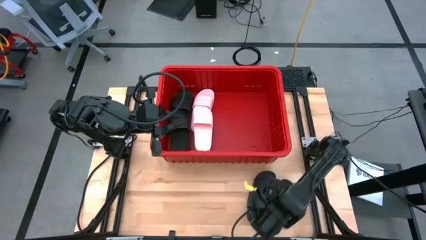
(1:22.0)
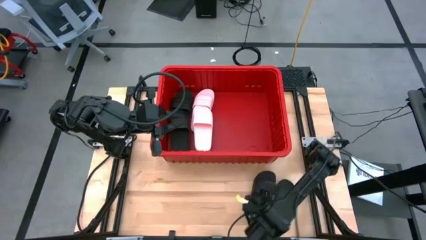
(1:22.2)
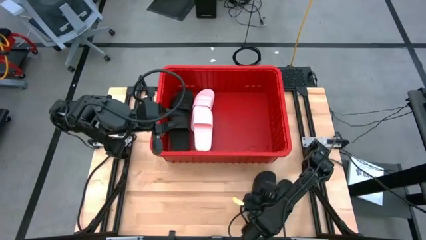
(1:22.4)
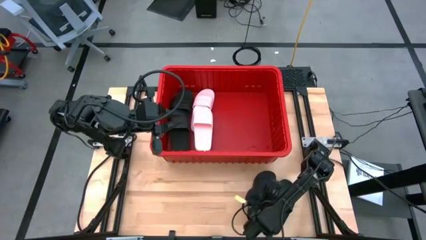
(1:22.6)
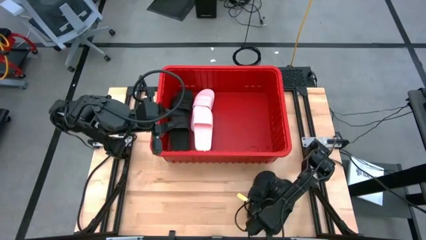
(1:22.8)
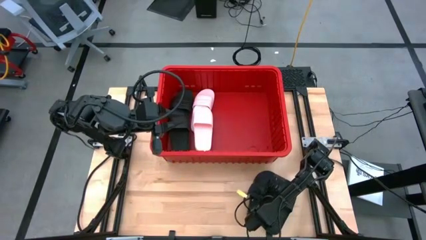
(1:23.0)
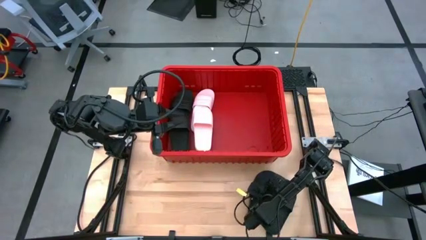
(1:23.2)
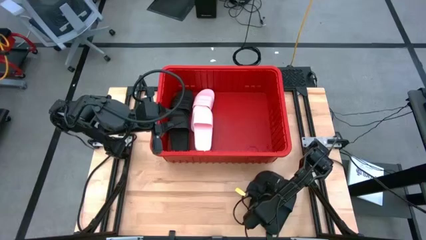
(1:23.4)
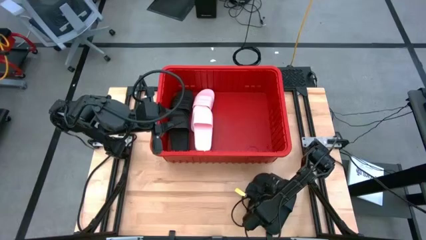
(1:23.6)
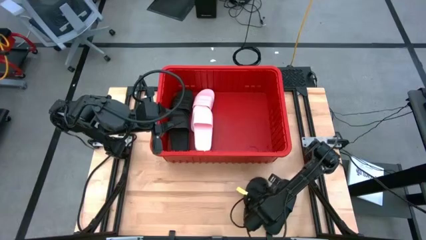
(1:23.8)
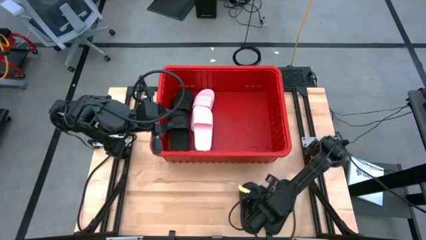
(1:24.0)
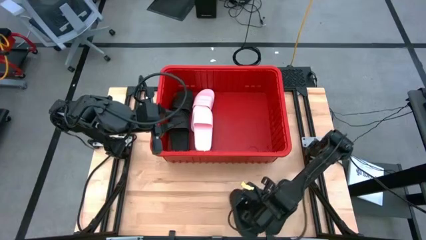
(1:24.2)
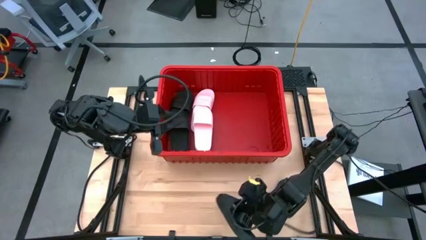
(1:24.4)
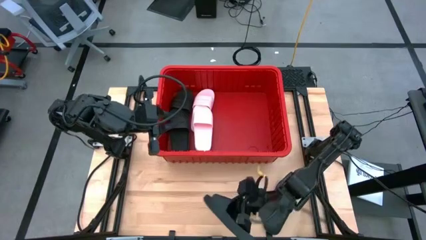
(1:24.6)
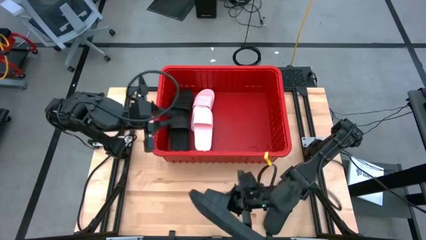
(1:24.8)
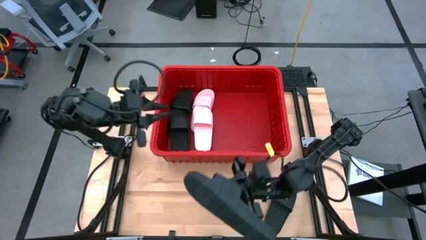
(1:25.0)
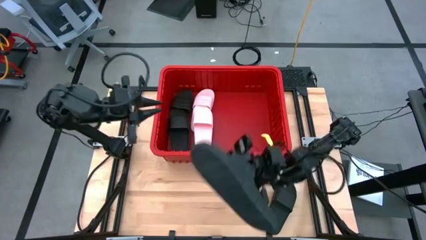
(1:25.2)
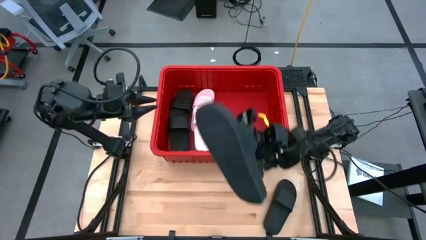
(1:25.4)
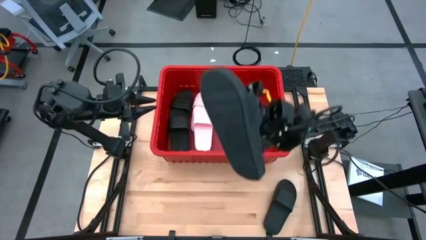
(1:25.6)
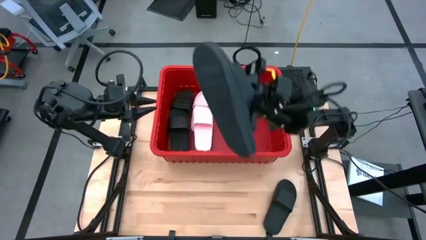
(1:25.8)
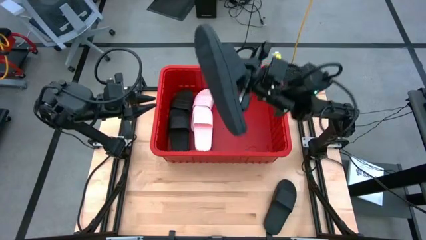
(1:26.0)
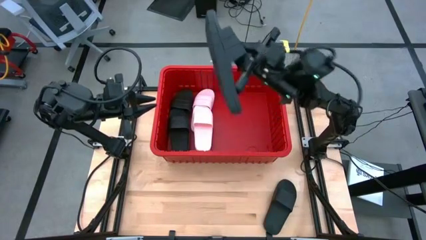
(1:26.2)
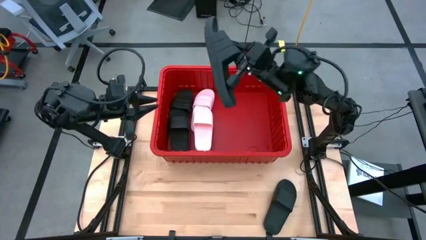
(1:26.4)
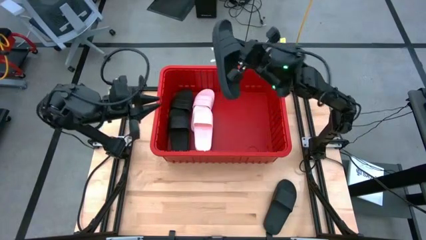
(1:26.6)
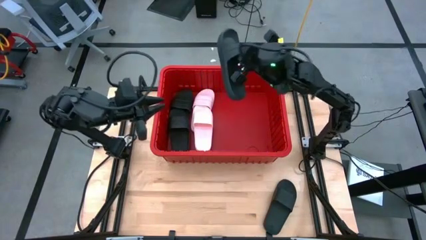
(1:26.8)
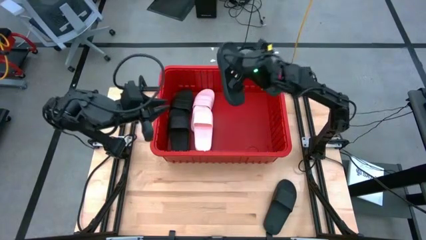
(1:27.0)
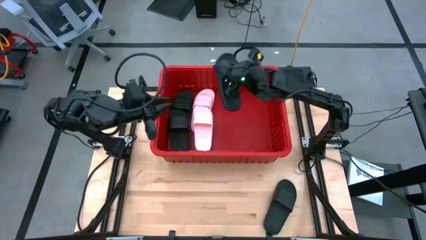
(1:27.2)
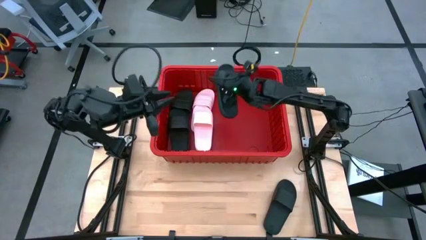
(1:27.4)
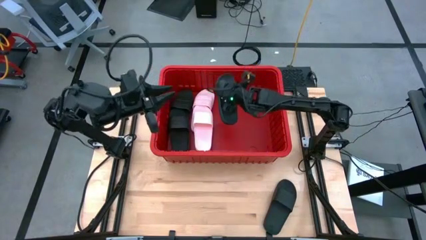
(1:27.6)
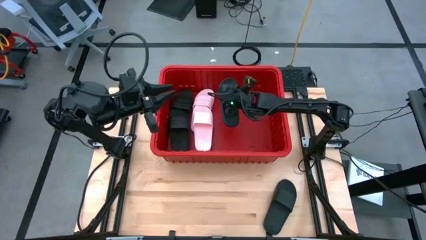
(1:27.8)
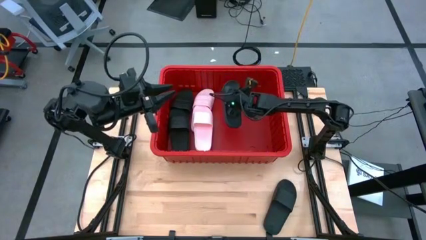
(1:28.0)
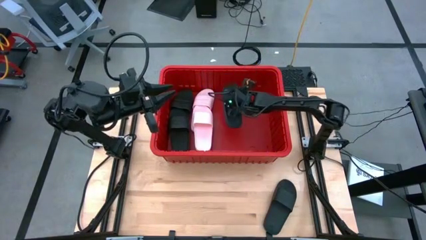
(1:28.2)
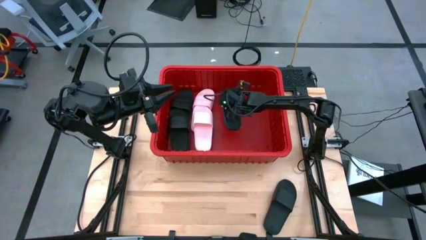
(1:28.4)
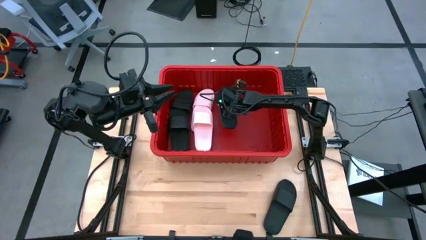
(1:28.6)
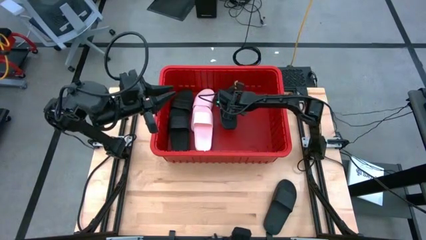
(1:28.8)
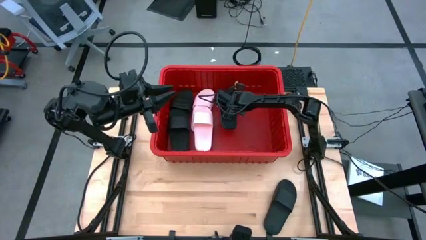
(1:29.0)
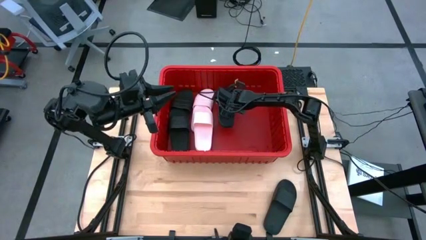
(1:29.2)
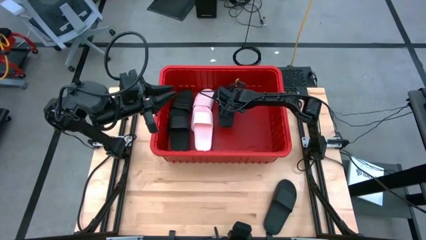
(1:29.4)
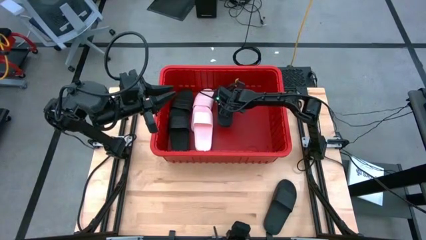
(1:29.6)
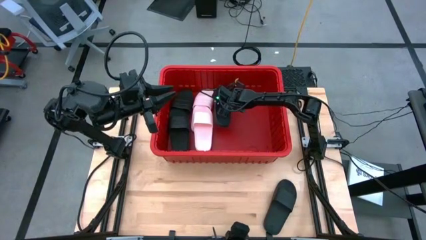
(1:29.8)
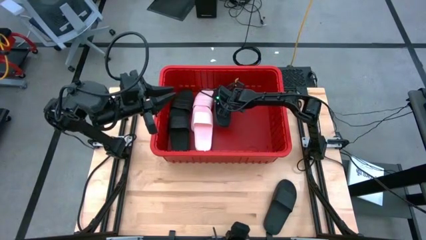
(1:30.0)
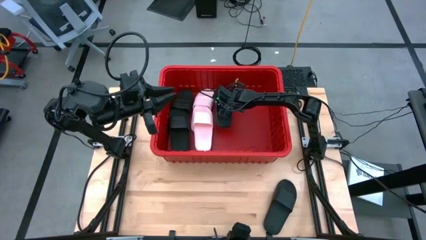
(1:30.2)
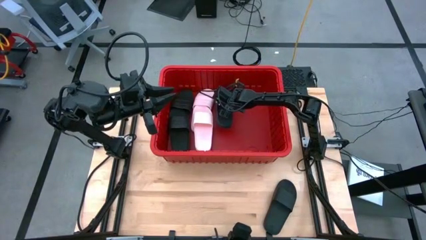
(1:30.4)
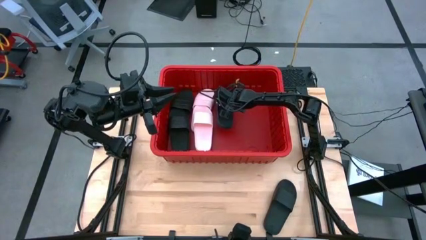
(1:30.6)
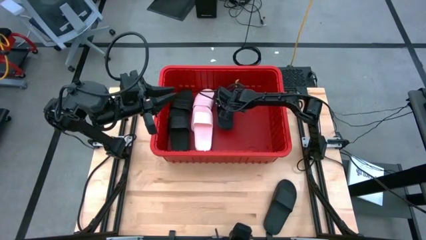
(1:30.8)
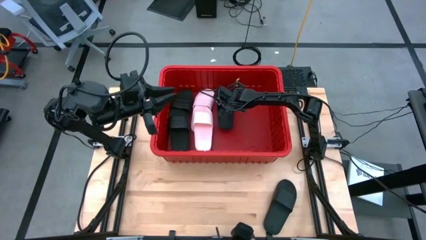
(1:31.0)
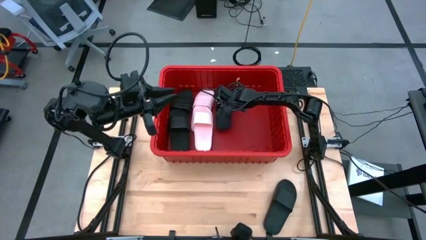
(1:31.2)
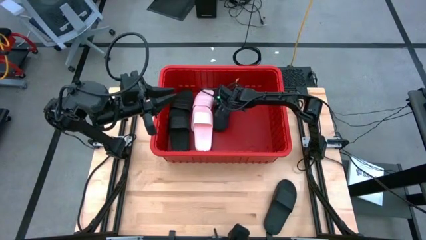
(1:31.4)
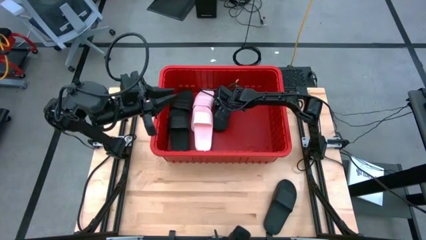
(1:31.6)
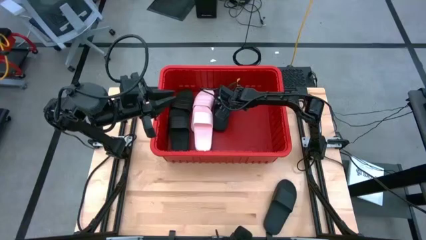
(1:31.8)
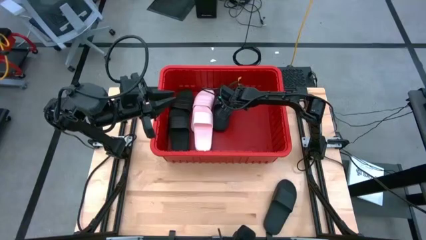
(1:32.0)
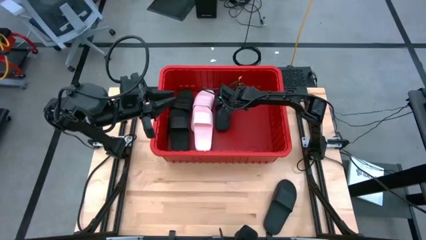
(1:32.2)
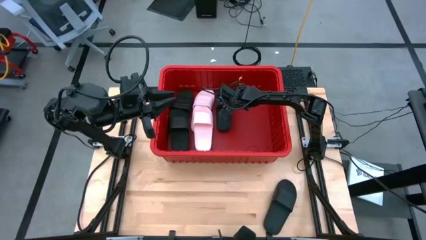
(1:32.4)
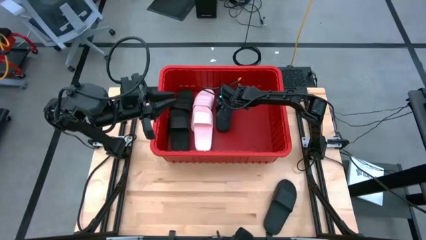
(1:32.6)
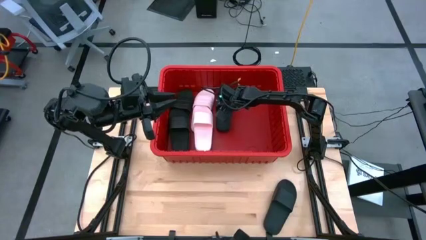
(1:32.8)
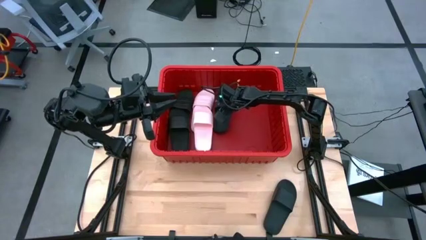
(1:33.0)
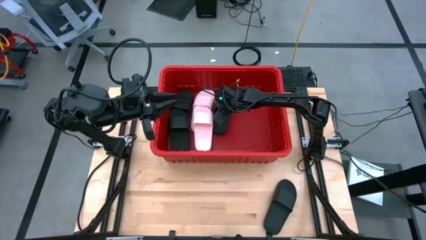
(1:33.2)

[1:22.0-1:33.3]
Task: Pick and place slides into bin
Put the black slide into the red bin
